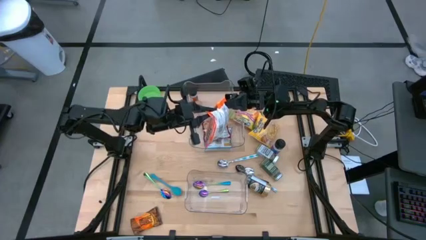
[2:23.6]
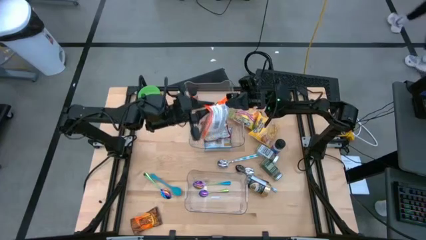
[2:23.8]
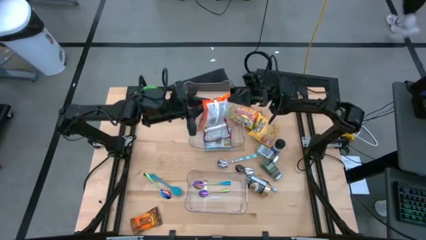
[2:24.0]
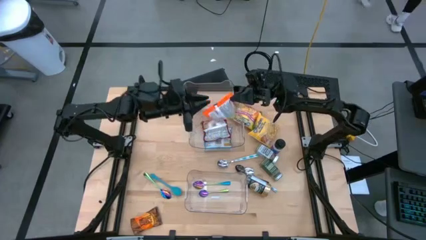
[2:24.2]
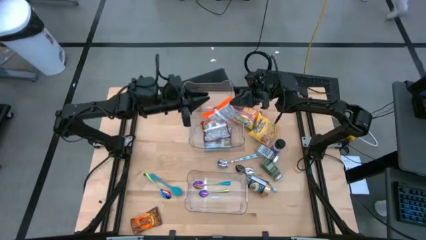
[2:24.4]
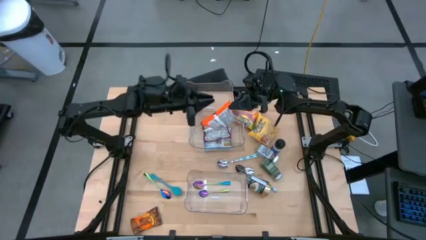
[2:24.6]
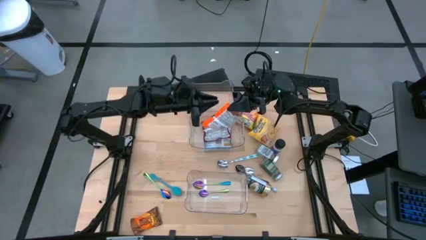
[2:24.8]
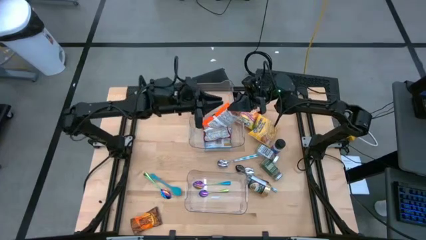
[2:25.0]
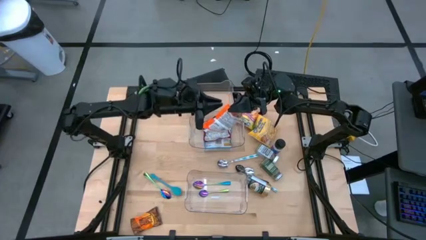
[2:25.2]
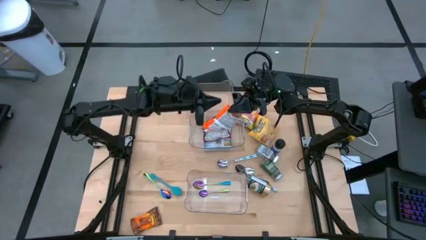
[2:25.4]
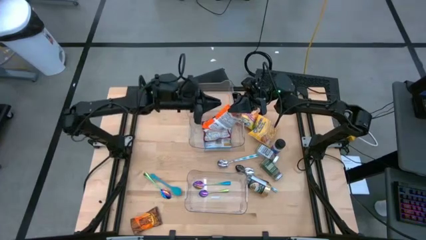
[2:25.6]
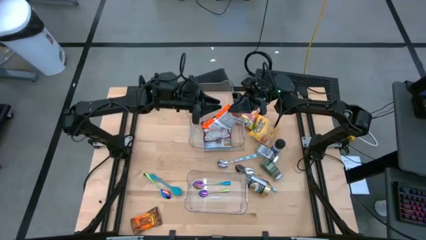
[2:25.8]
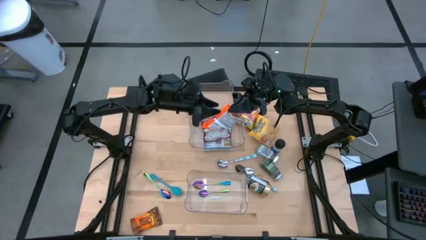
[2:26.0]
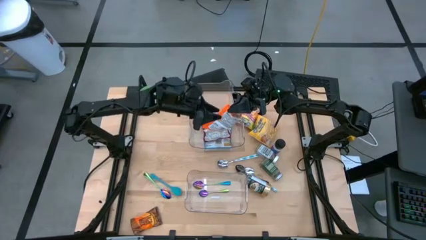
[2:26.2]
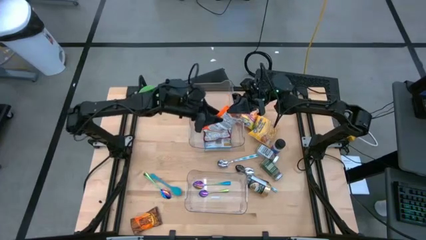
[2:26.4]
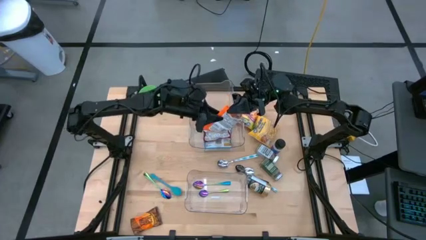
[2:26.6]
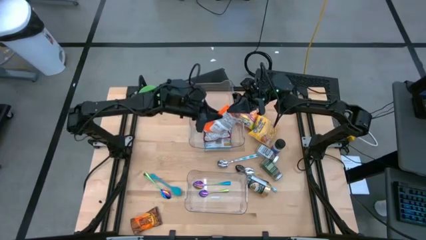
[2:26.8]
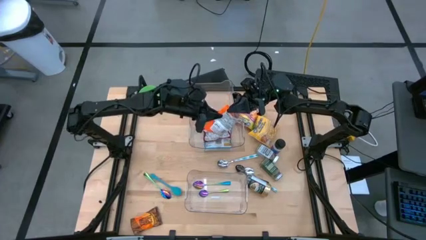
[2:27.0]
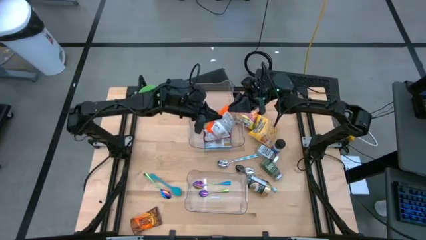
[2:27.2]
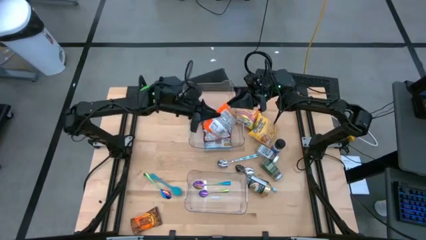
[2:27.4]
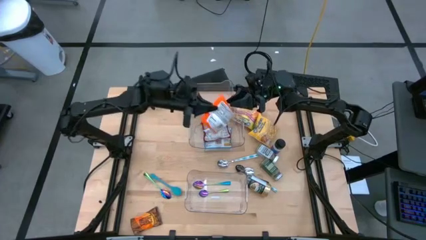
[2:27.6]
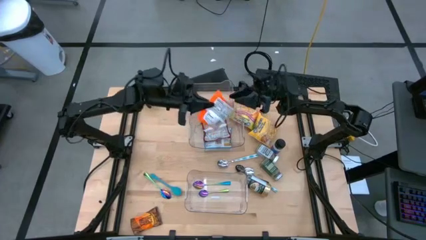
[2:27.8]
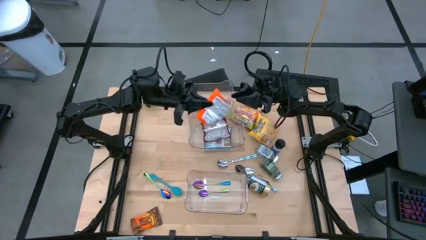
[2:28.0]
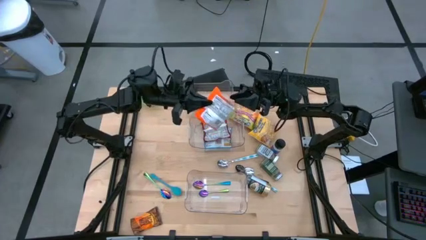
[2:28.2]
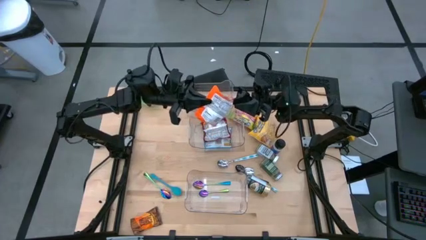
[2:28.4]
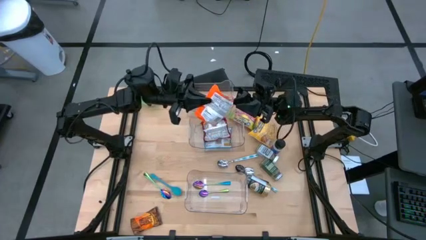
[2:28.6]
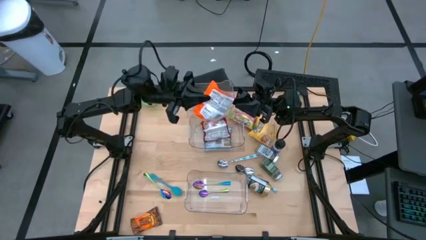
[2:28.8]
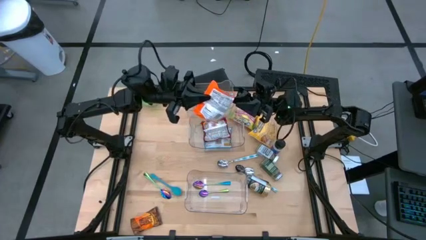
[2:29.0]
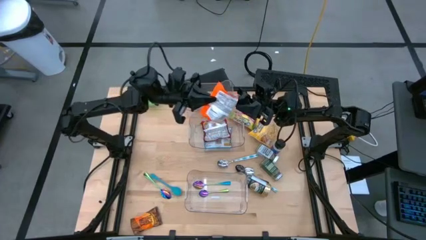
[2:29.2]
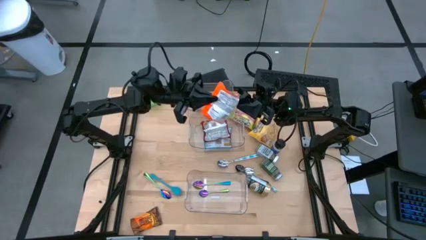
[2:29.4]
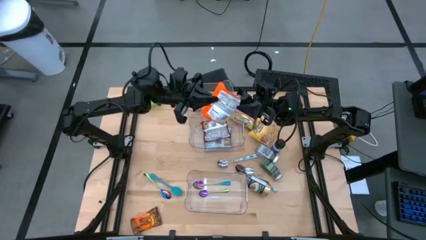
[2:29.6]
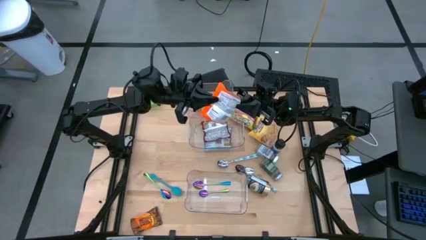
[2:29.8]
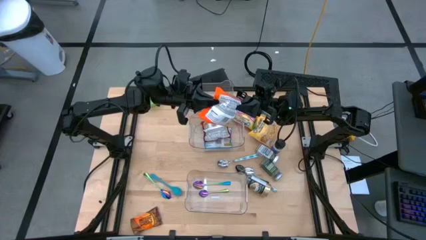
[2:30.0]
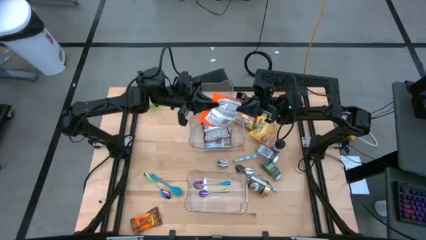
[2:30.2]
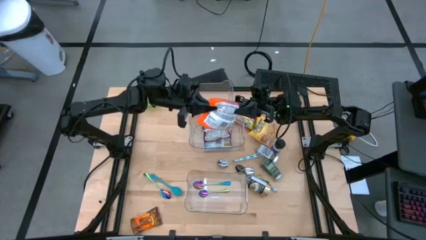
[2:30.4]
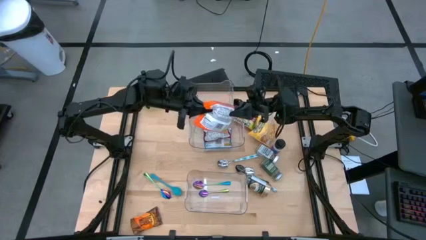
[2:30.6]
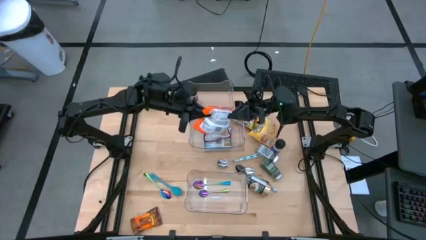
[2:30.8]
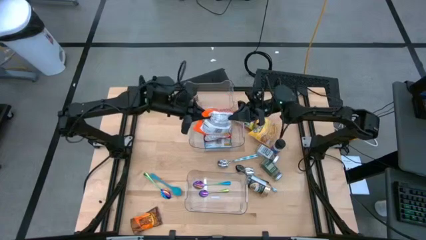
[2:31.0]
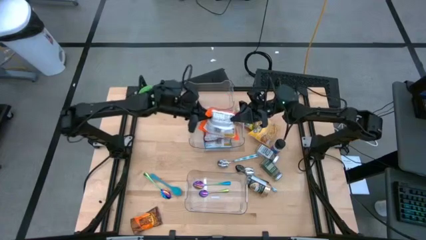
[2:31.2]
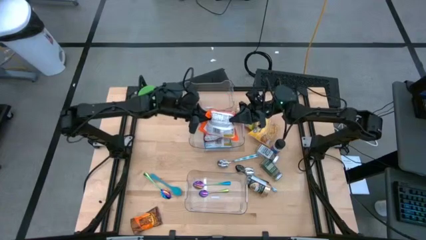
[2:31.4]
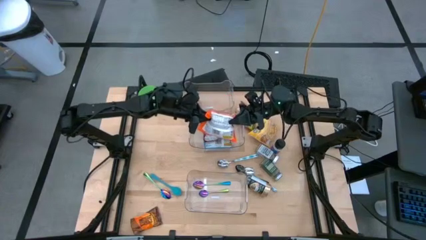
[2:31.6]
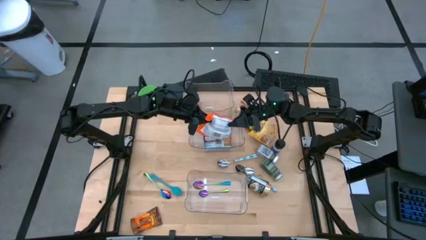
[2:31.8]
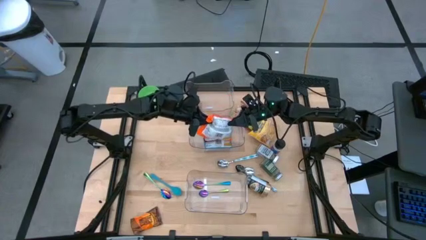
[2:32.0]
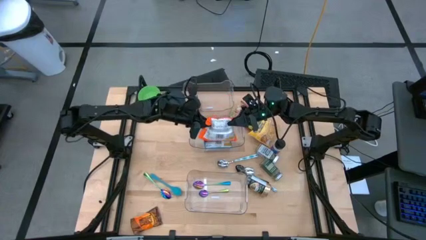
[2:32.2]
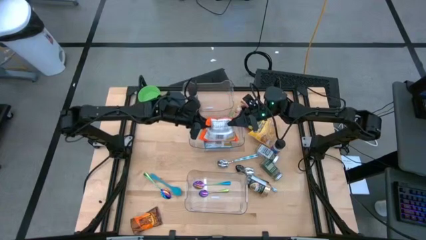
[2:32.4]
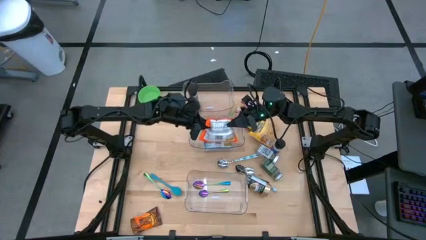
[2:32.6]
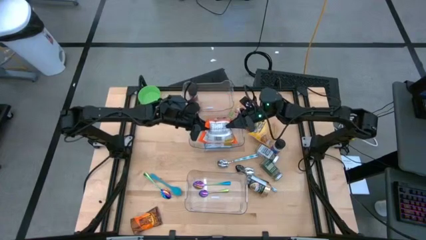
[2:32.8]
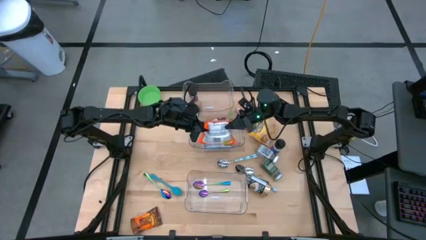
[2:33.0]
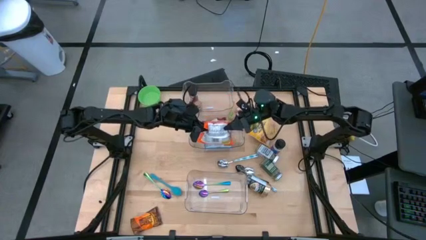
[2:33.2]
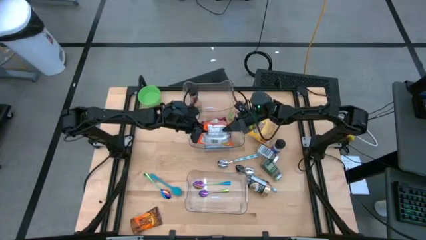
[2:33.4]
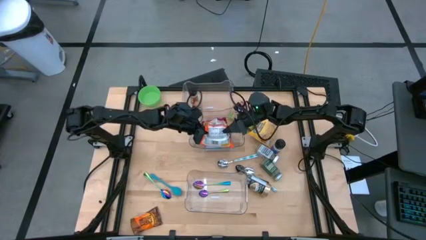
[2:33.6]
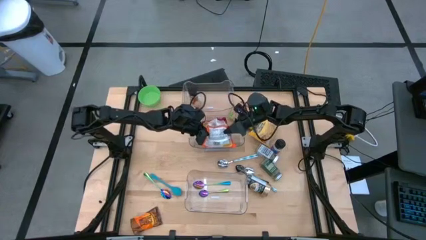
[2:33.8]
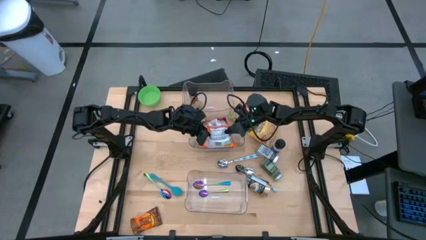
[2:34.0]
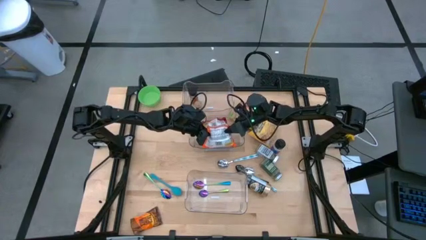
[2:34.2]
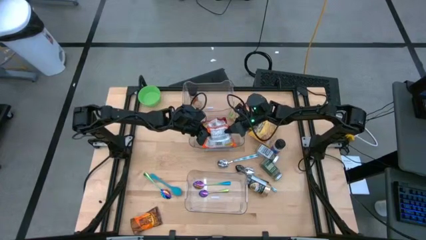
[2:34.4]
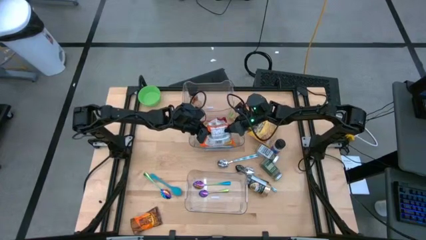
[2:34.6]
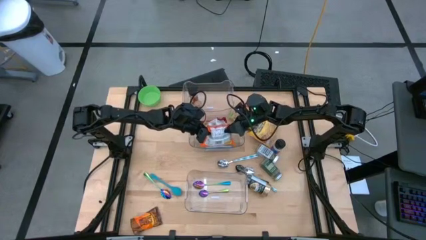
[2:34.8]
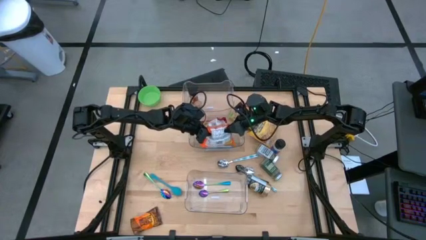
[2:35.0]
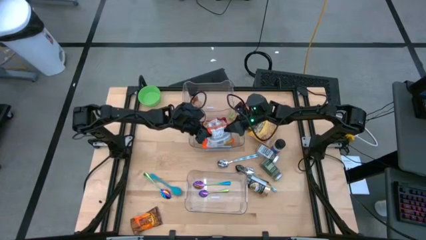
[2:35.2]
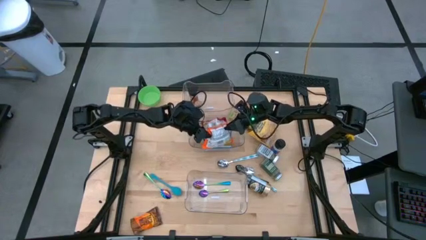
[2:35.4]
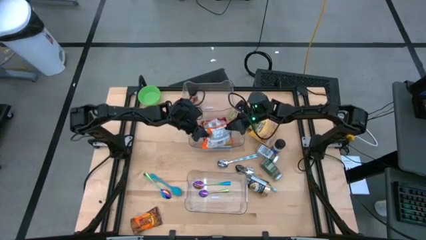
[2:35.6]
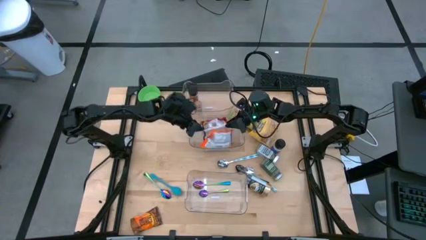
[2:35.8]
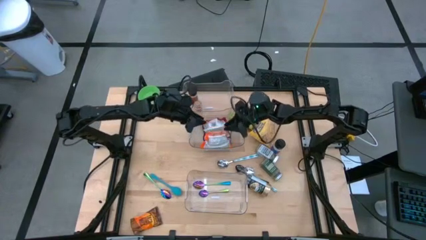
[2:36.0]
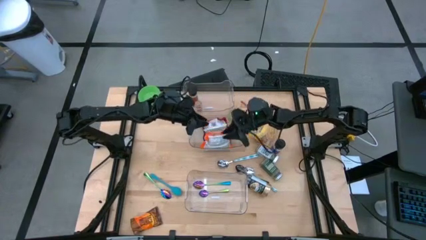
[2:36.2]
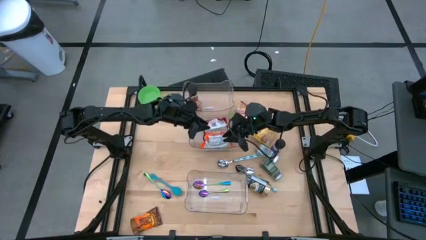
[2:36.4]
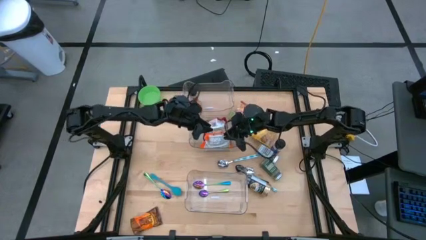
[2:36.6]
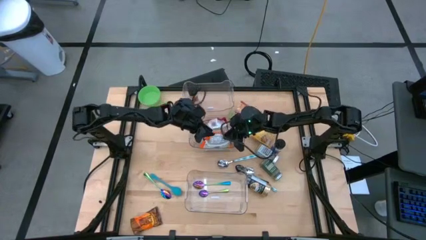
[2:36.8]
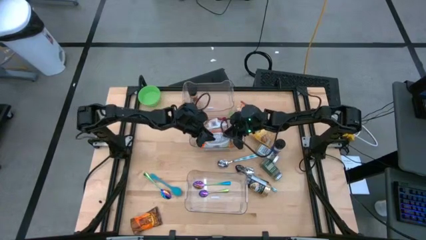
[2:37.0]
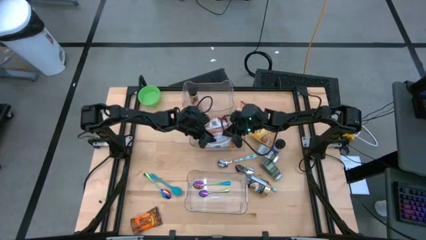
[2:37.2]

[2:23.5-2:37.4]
Task: Pick & Place Food Item
Put the orange noodle pack into the middle transparent bin
